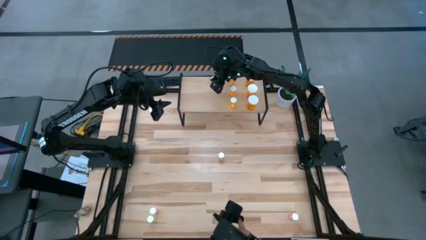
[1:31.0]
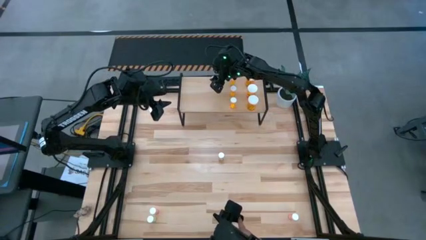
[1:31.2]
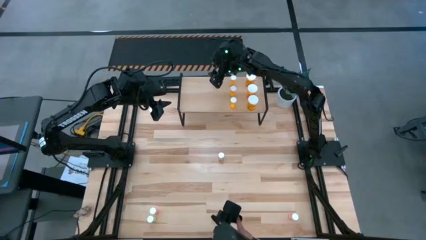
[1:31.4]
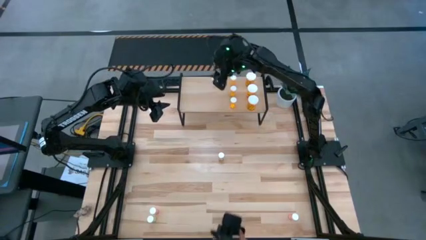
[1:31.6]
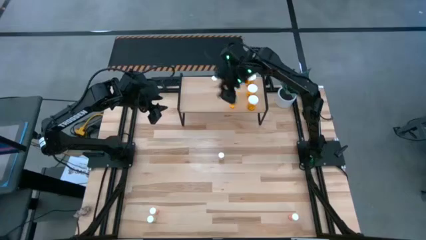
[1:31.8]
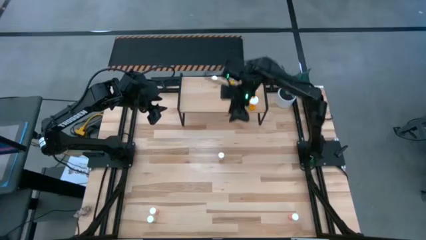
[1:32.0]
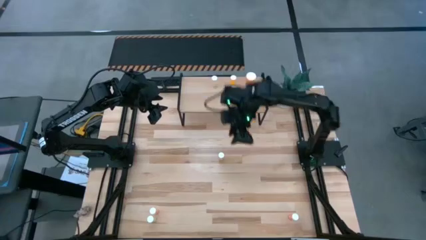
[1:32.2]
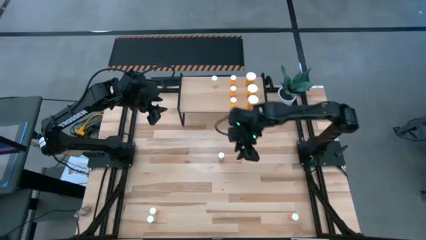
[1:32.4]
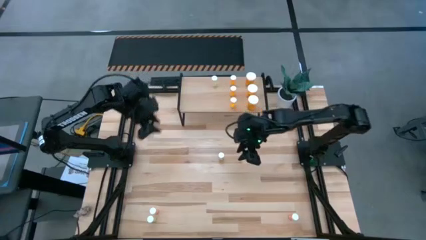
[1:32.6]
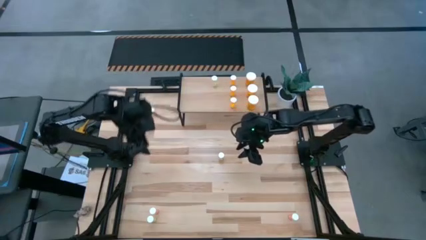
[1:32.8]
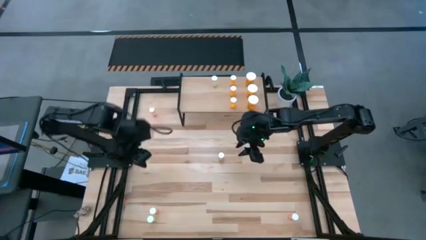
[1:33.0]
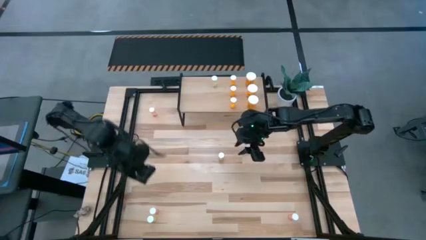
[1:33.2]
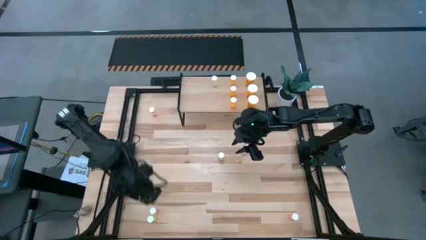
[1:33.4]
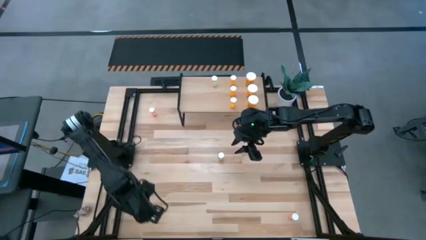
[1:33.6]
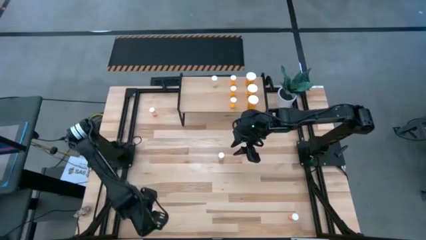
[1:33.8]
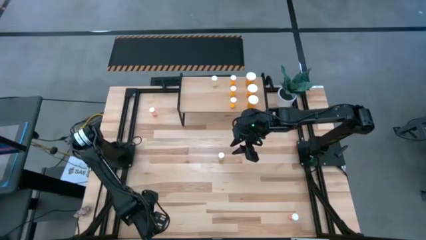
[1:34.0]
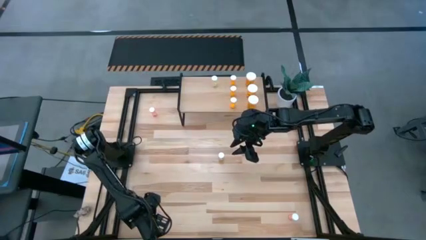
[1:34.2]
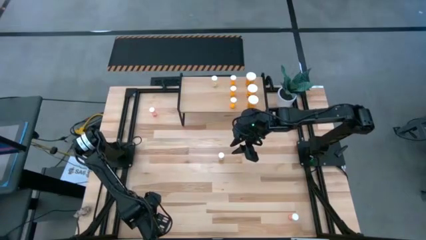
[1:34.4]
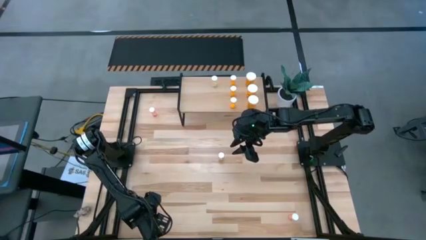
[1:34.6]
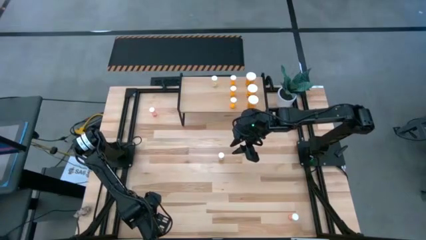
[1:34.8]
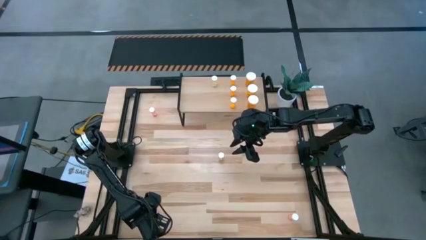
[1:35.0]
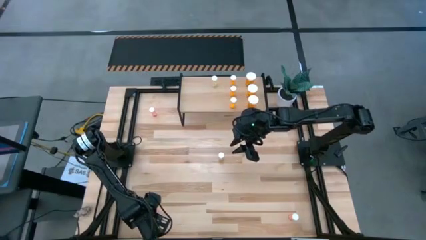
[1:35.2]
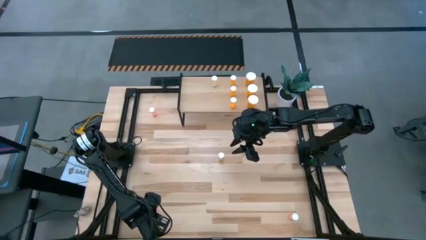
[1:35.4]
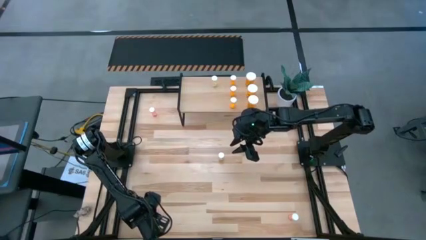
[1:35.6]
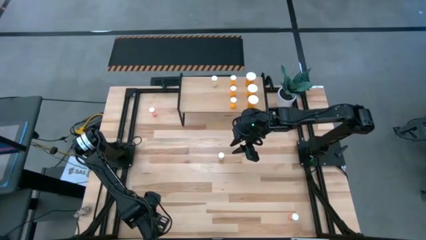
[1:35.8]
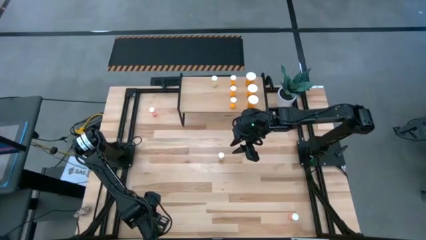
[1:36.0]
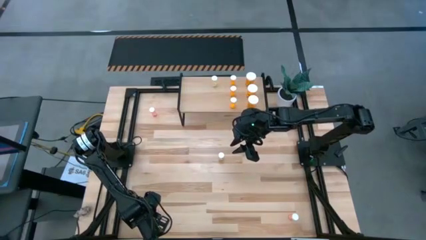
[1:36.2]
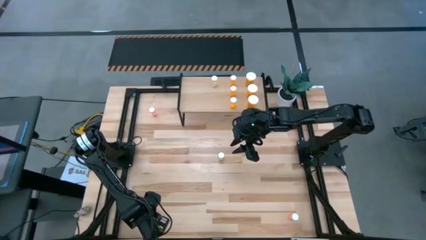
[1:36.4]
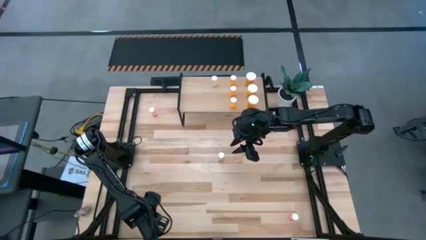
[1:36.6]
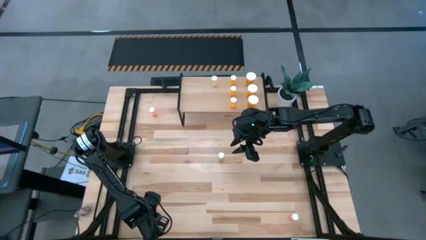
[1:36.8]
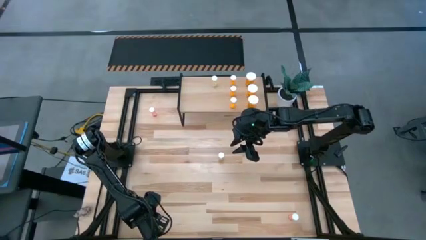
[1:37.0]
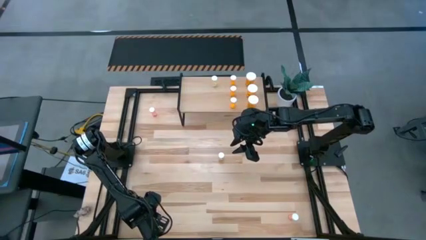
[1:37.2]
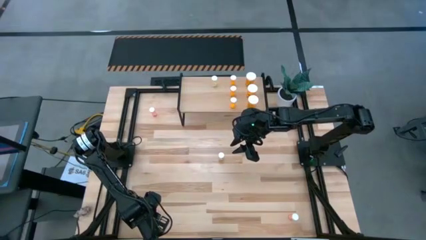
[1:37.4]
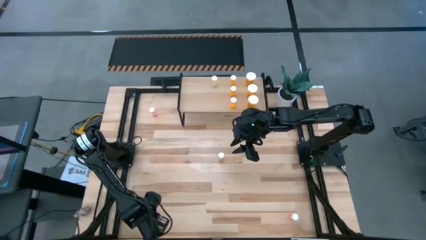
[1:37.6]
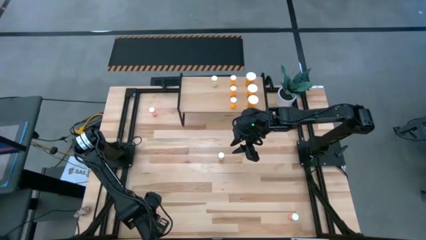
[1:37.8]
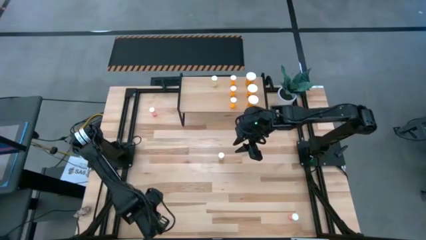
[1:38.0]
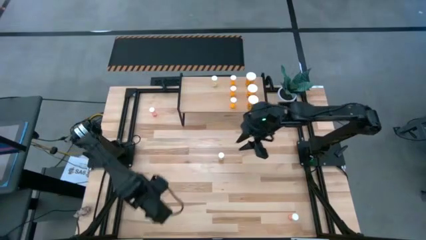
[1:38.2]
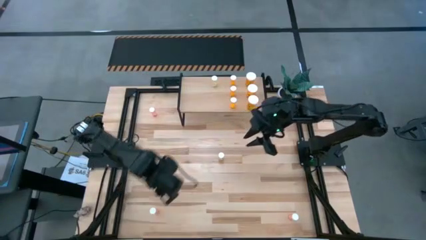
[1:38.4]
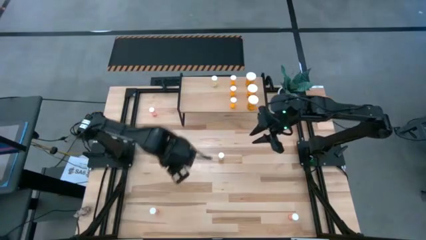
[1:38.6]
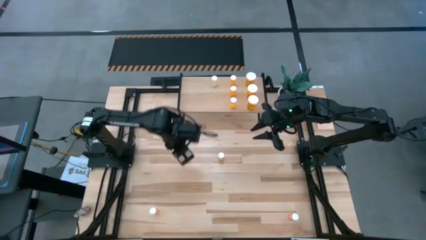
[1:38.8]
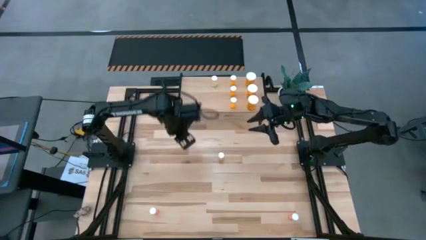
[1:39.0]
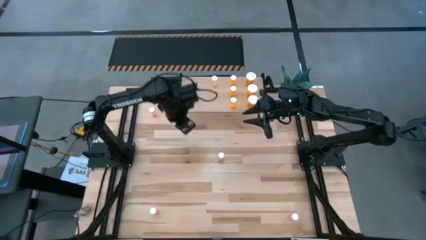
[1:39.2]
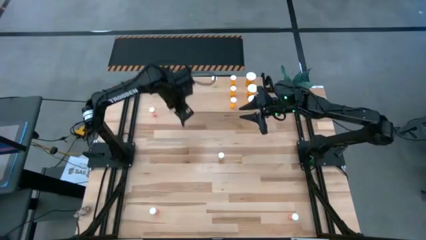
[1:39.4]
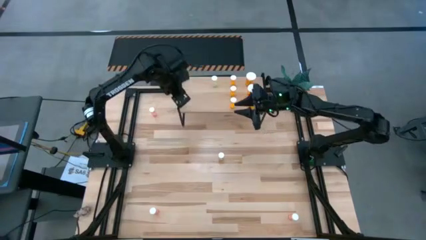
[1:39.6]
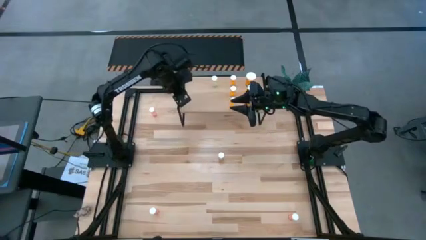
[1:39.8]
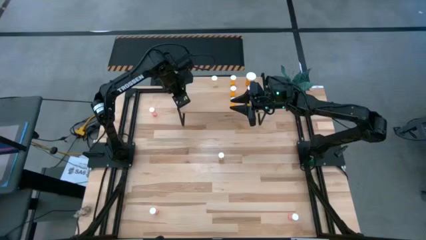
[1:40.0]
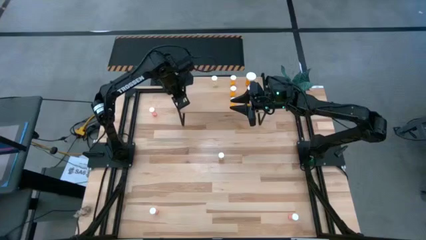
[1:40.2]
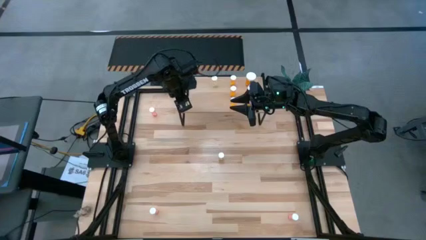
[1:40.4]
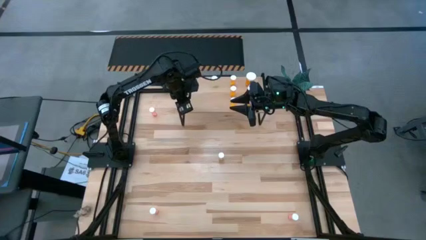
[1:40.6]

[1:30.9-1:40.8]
Task: Pick and place medicine bottles onto shelf by color
Put the bottom yellow pill bottle on the shelf aligned with the other small yellow pill bottle

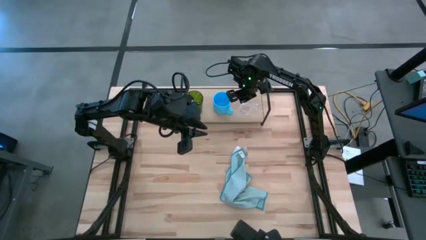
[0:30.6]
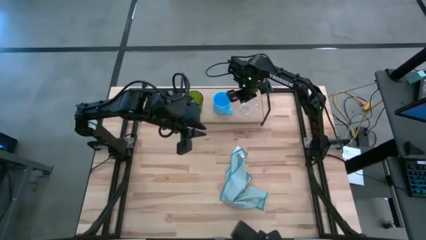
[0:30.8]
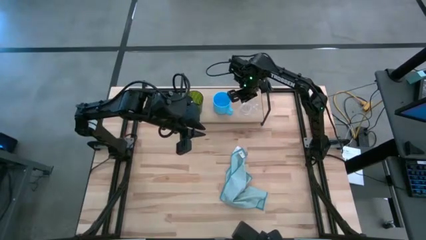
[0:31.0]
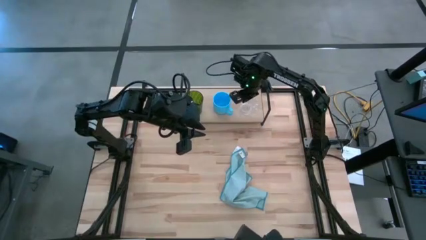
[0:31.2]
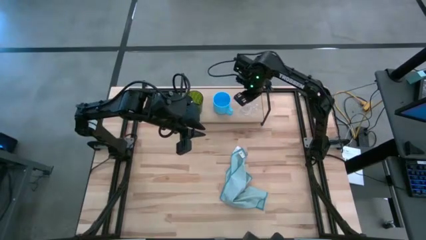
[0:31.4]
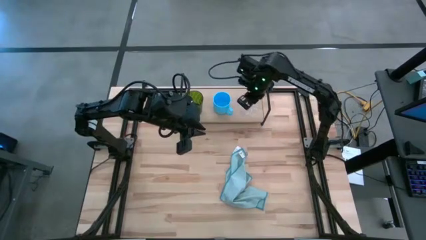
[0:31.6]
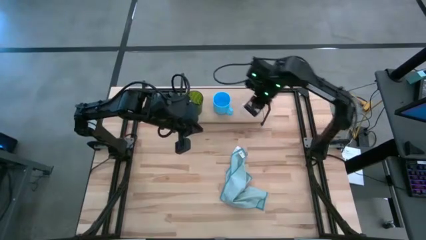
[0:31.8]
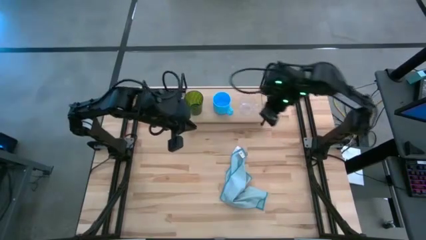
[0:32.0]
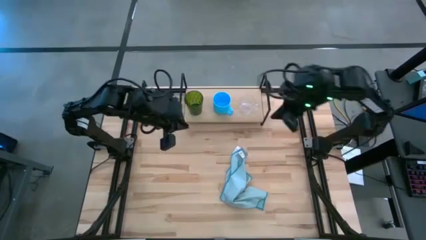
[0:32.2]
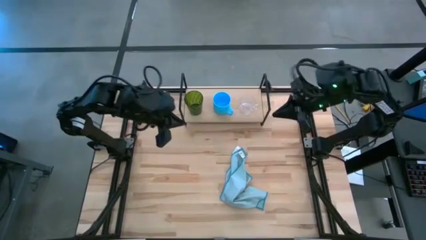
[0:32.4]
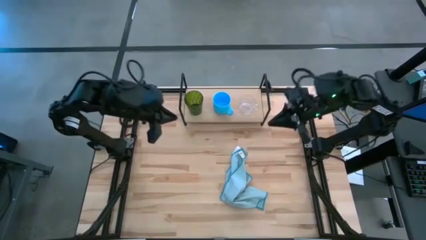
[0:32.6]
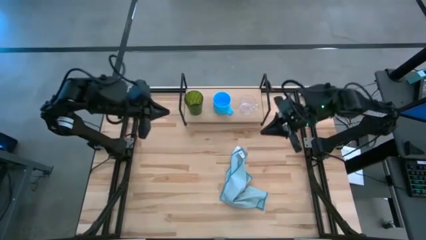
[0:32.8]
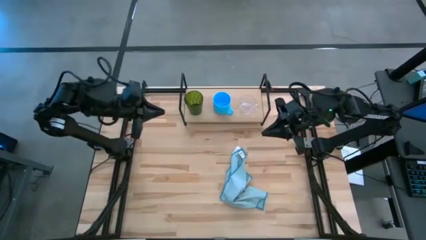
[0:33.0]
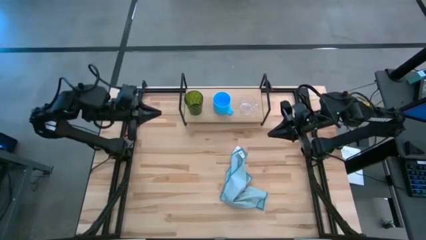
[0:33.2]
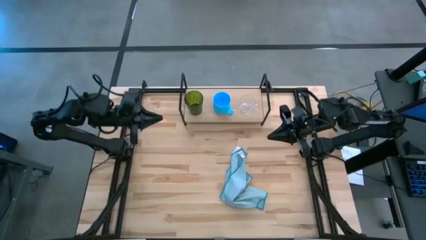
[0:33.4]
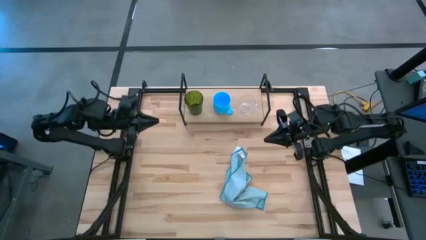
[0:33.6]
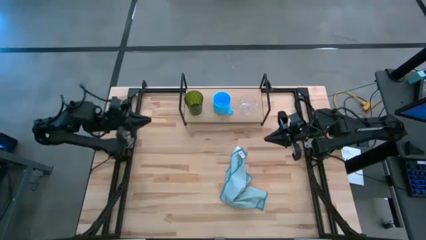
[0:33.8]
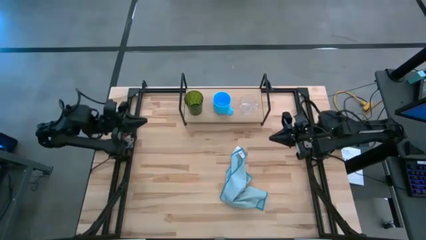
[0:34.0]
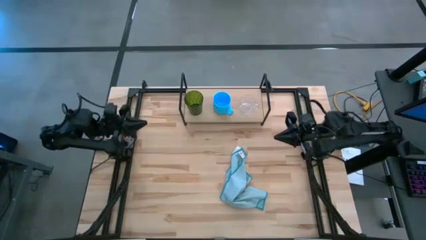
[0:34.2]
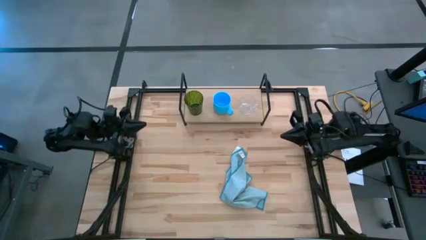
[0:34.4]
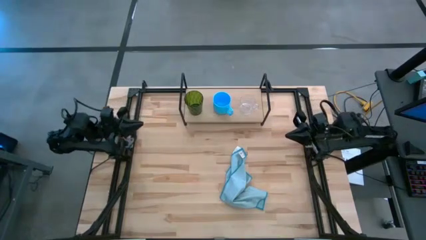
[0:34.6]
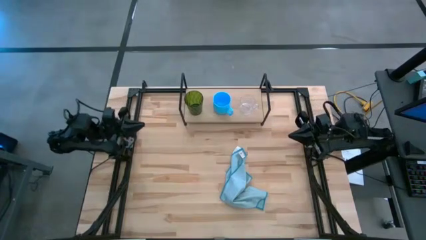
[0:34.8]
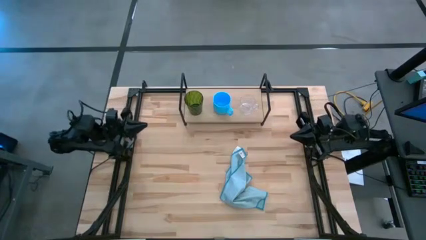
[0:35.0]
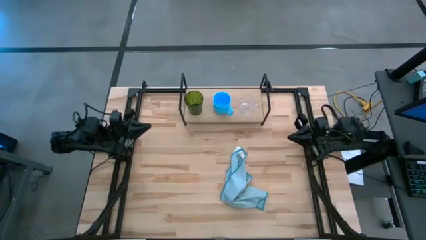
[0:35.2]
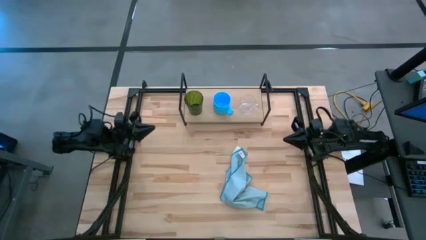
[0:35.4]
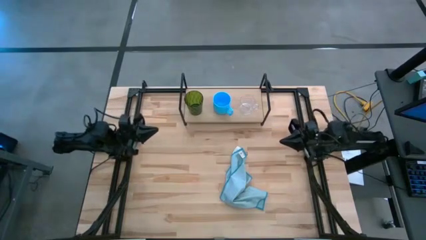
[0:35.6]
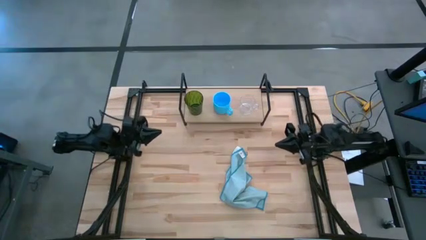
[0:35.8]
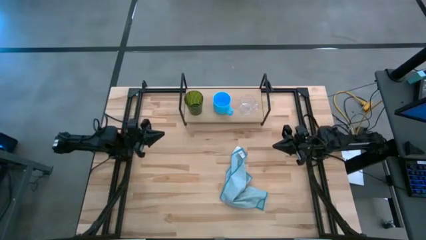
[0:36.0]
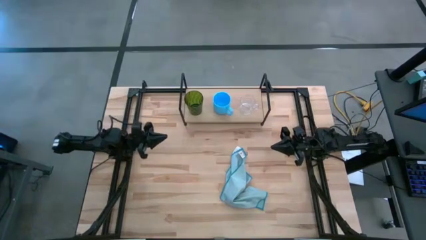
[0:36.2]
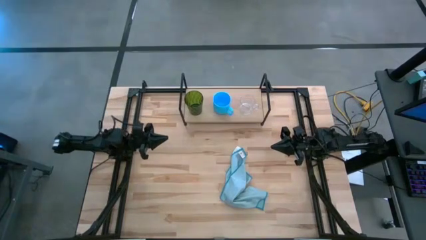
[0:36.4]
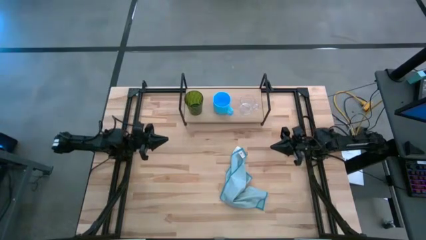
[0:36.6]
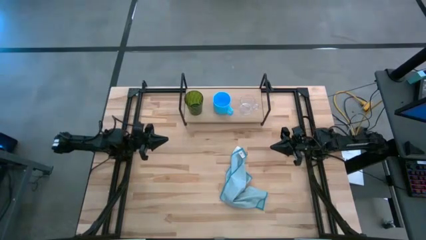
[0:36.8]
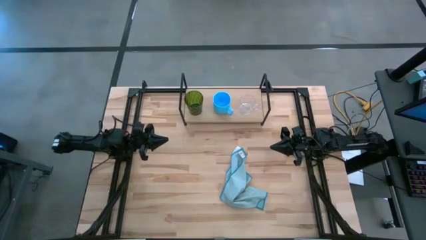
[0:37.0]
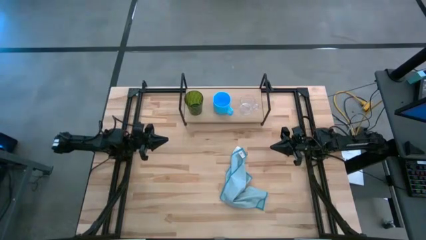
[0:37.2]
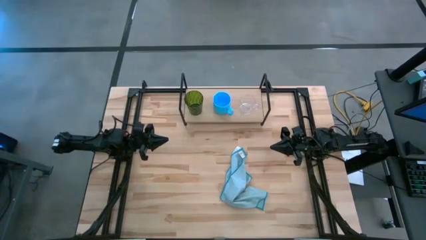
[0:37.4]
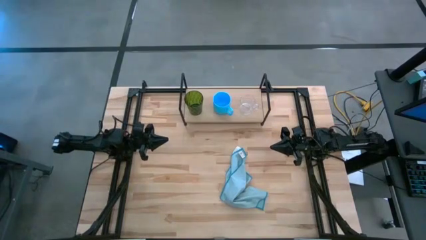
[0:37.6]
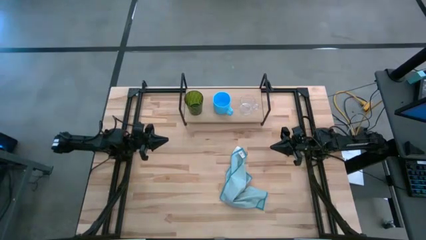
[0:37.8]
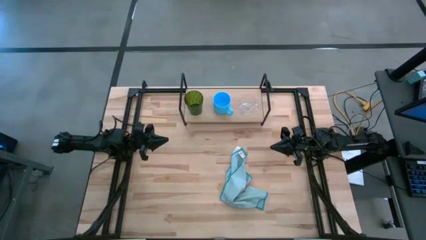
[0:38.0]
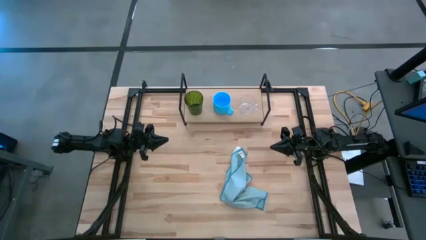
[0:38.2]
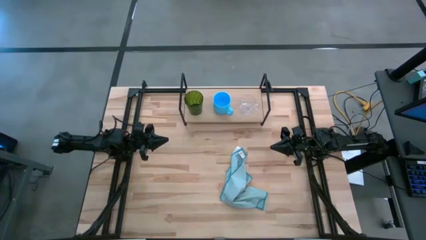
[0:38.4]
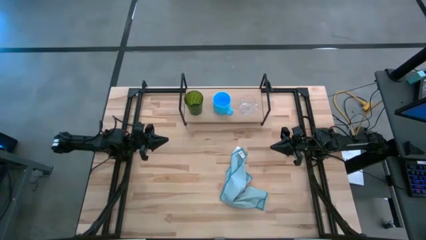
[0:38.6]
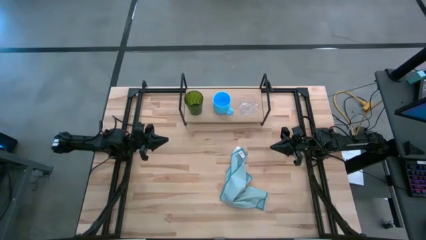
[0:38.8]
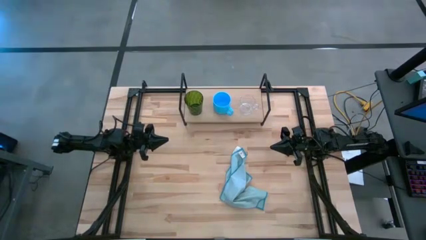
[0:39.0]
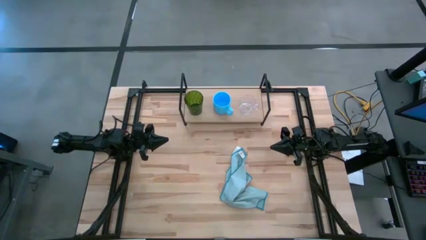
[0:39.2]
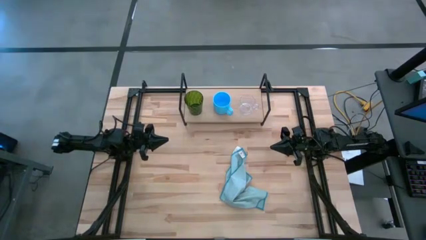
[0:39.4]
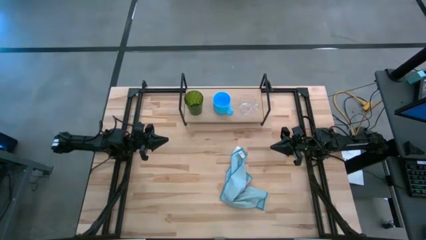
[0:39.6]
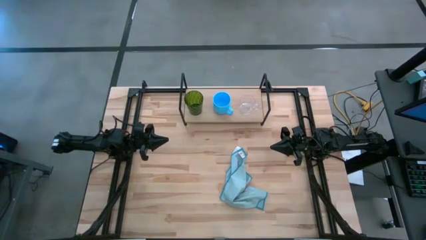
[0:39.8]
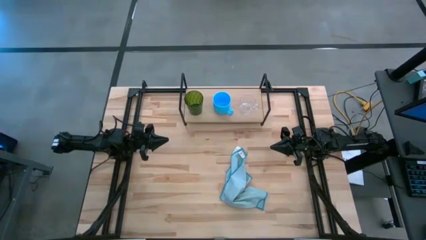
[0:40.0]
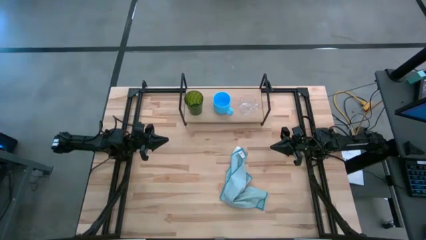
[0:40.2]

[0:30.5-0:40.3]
Task: Stack small to large cups/mugs on shelf
Return to Home Position
